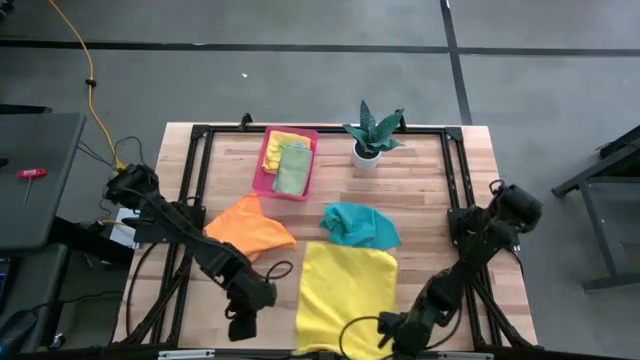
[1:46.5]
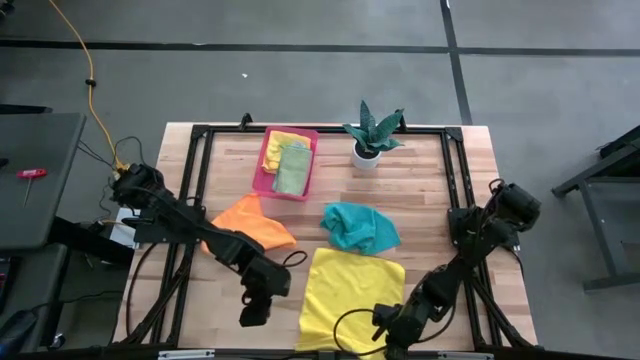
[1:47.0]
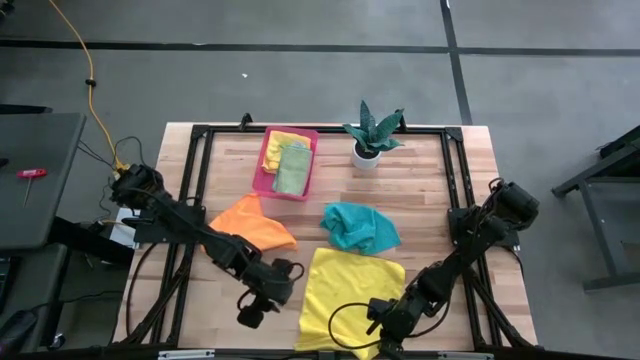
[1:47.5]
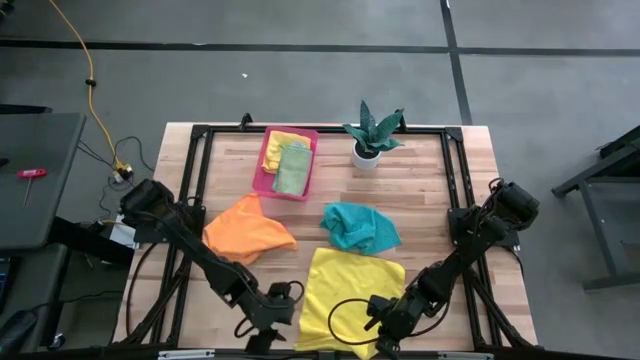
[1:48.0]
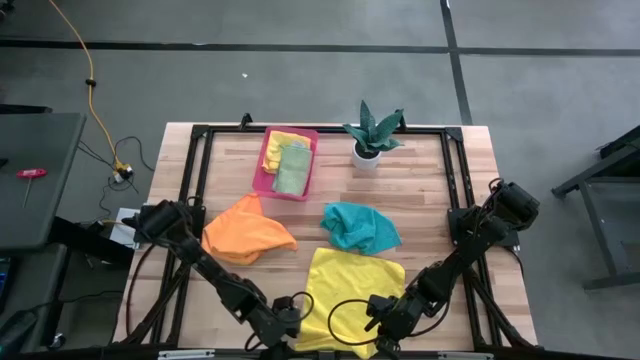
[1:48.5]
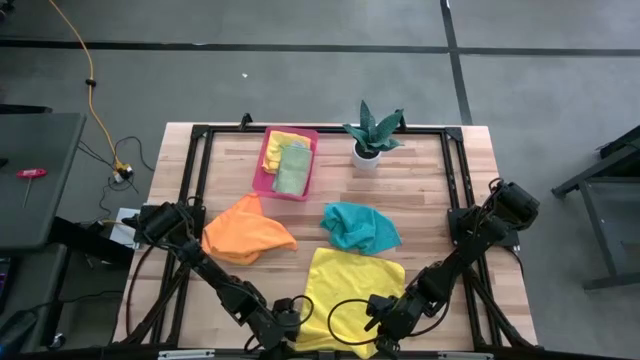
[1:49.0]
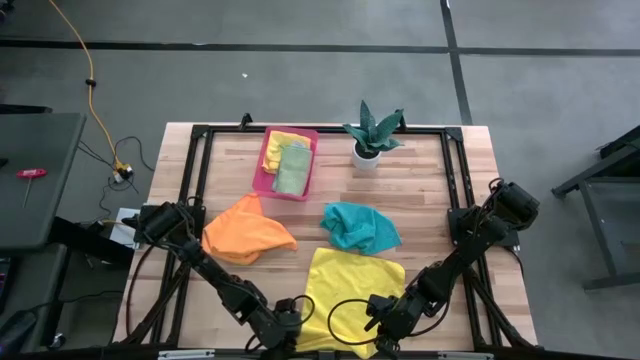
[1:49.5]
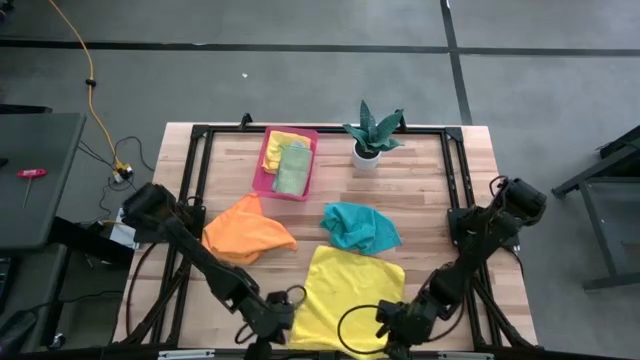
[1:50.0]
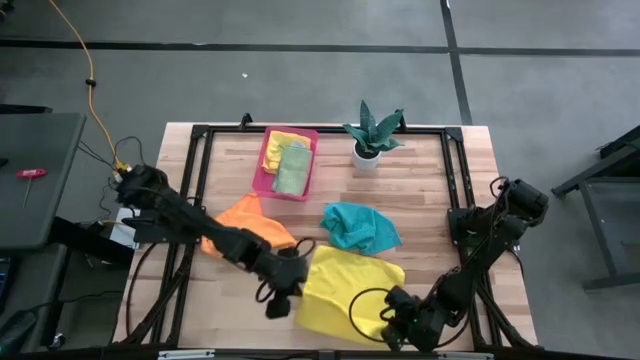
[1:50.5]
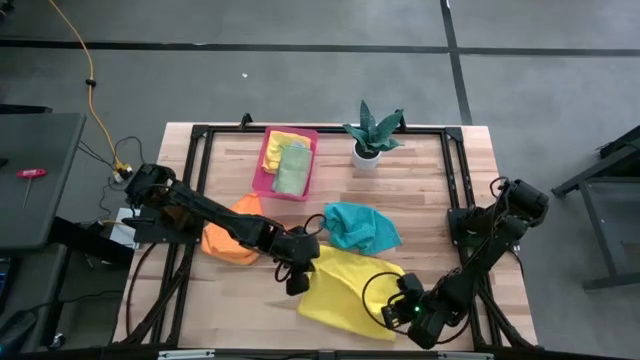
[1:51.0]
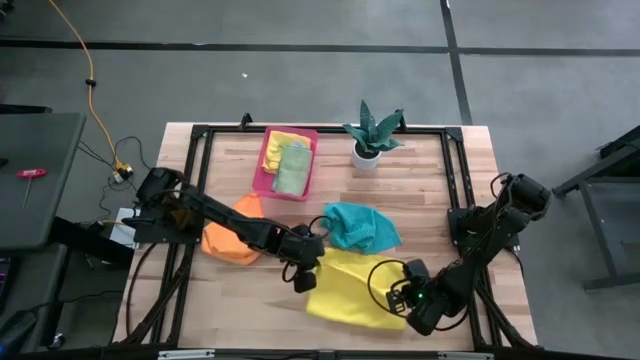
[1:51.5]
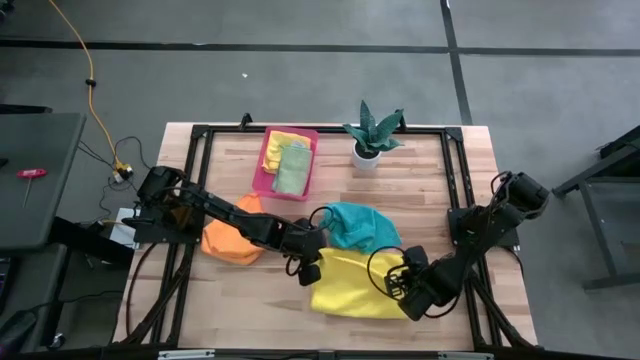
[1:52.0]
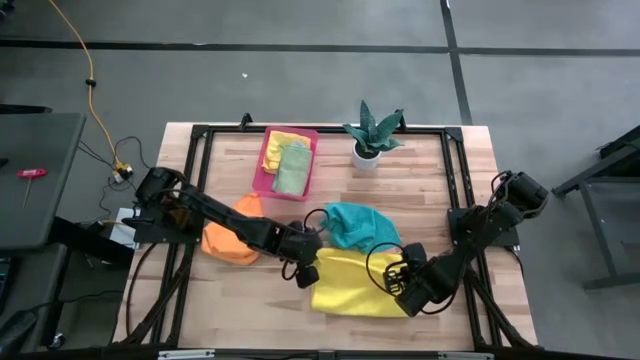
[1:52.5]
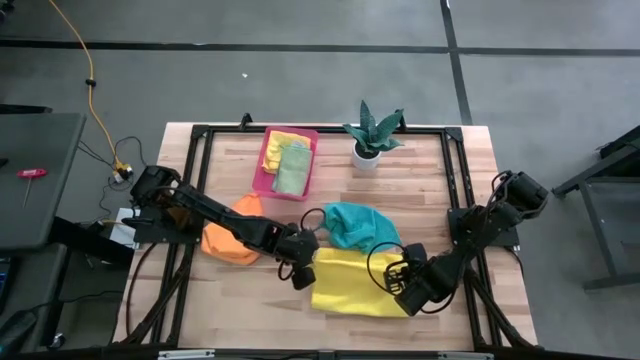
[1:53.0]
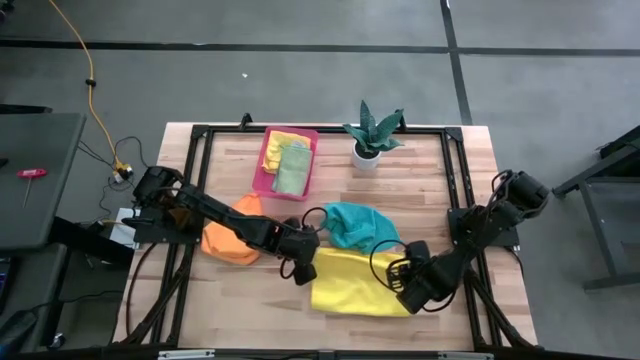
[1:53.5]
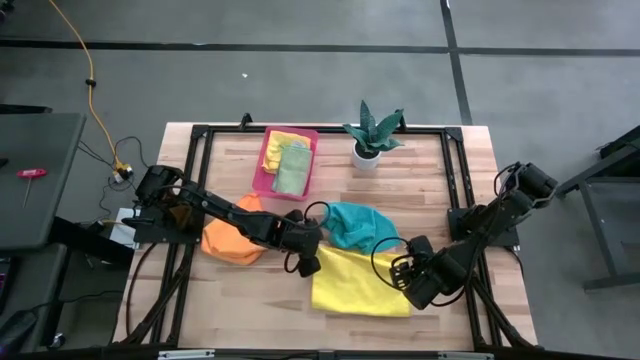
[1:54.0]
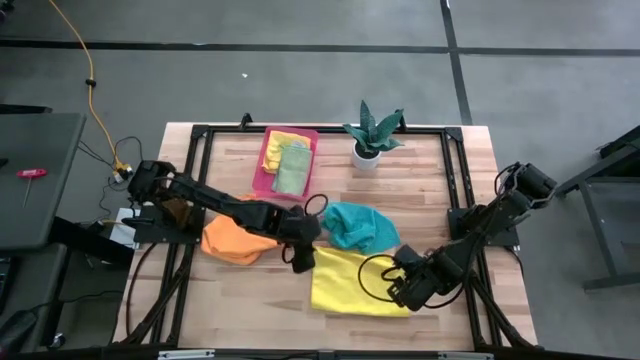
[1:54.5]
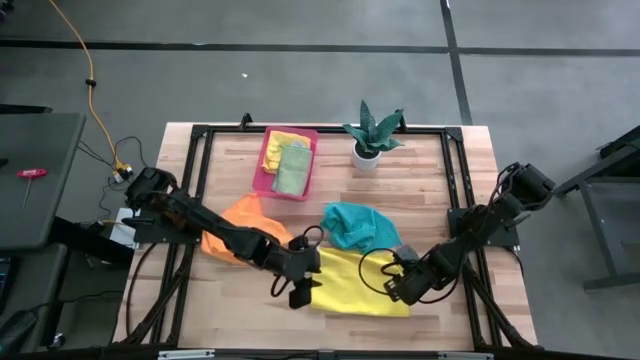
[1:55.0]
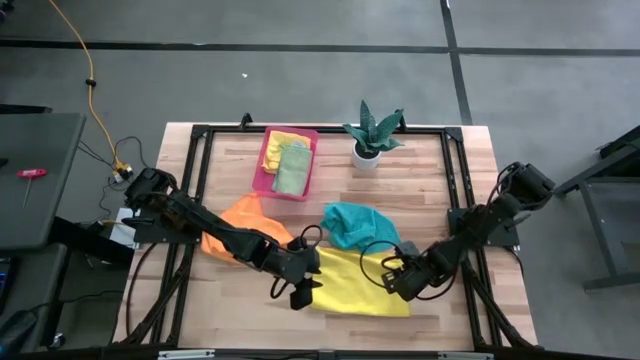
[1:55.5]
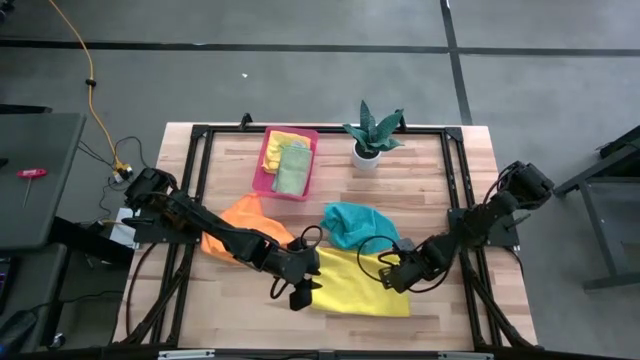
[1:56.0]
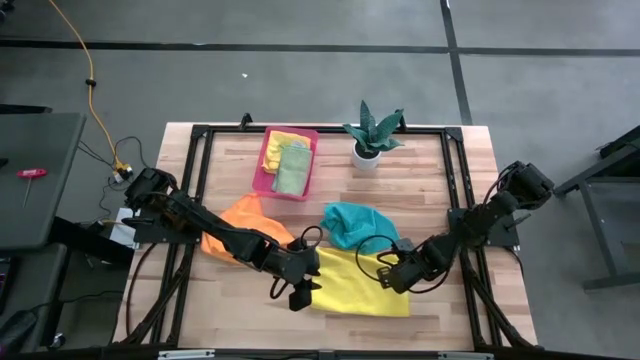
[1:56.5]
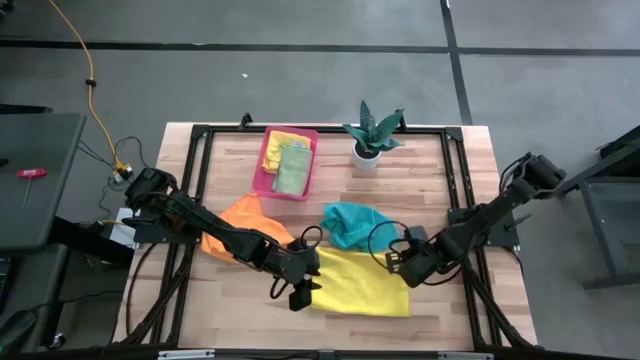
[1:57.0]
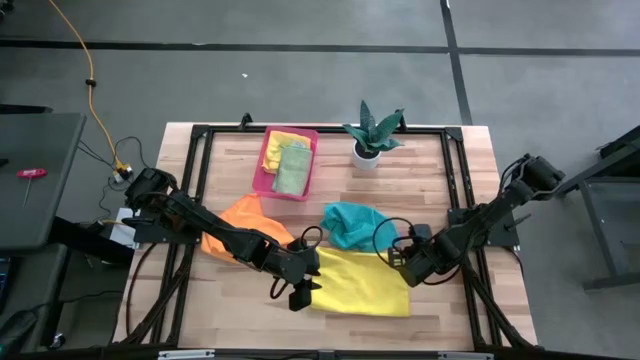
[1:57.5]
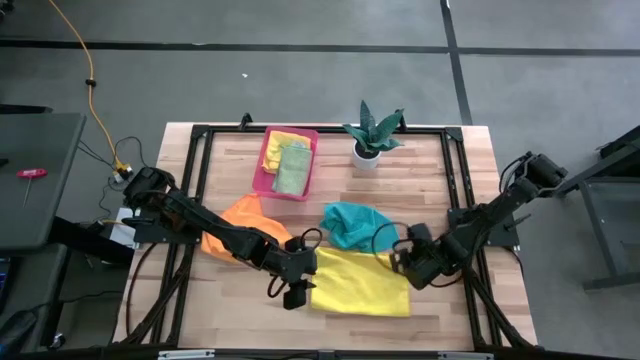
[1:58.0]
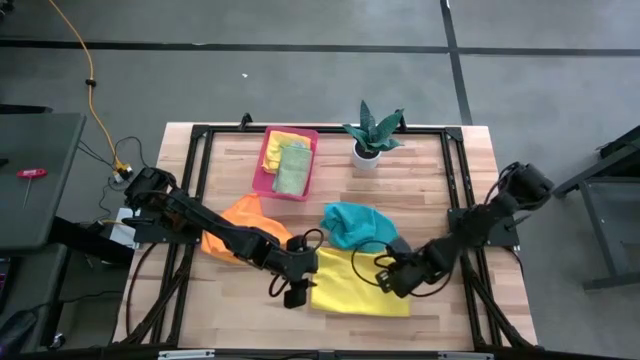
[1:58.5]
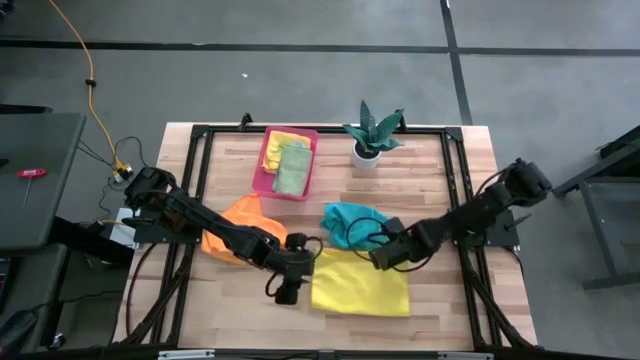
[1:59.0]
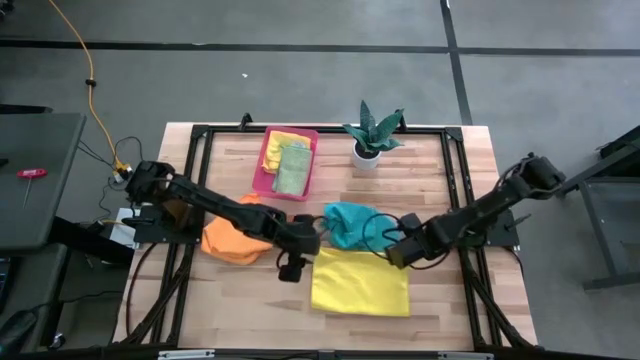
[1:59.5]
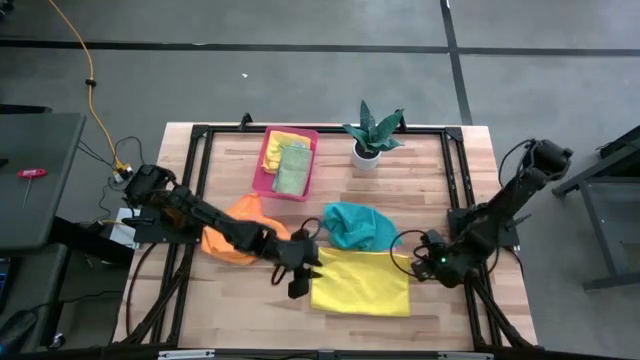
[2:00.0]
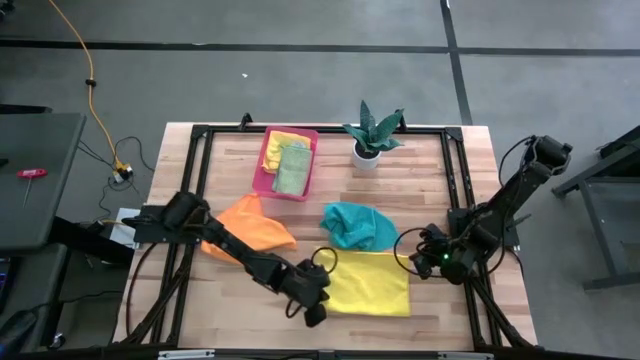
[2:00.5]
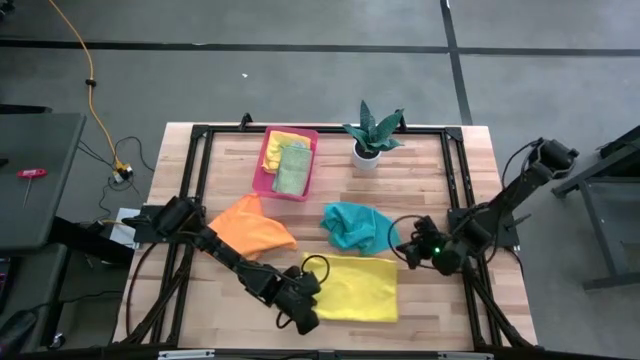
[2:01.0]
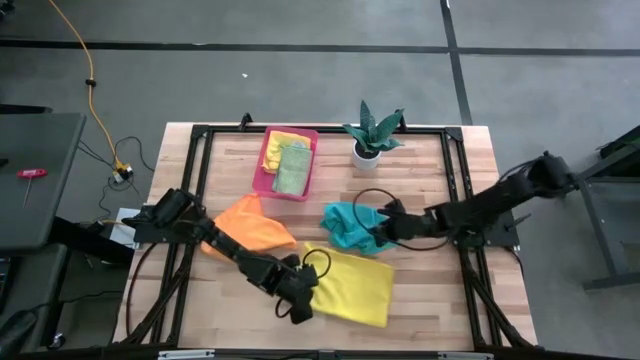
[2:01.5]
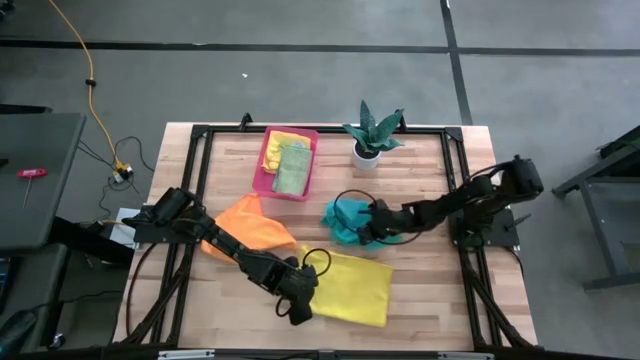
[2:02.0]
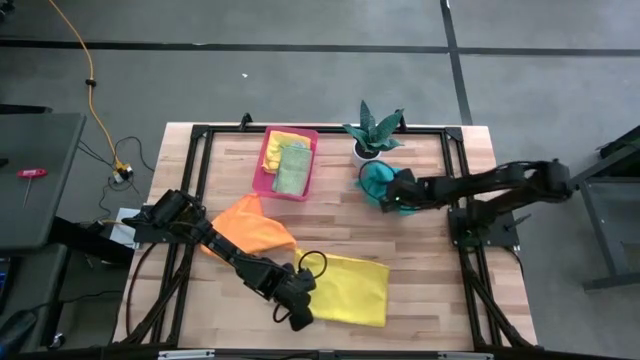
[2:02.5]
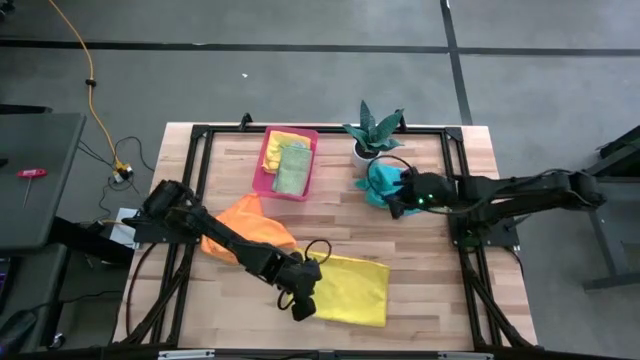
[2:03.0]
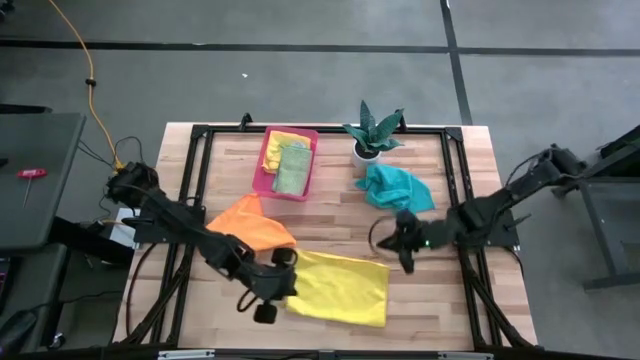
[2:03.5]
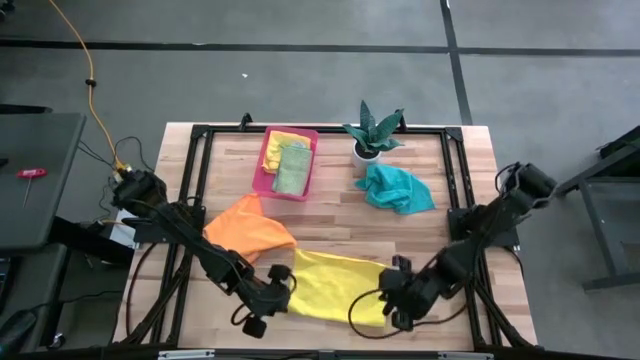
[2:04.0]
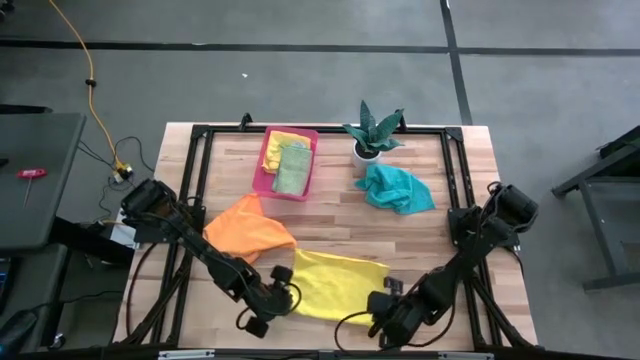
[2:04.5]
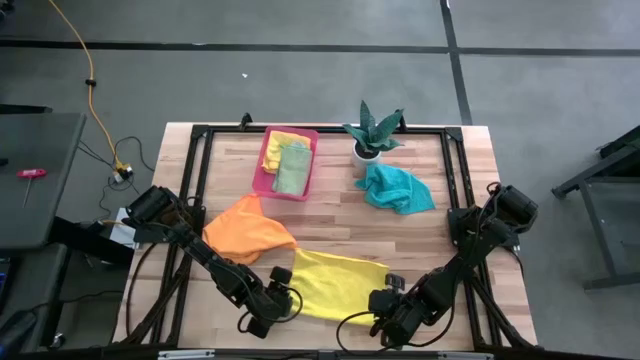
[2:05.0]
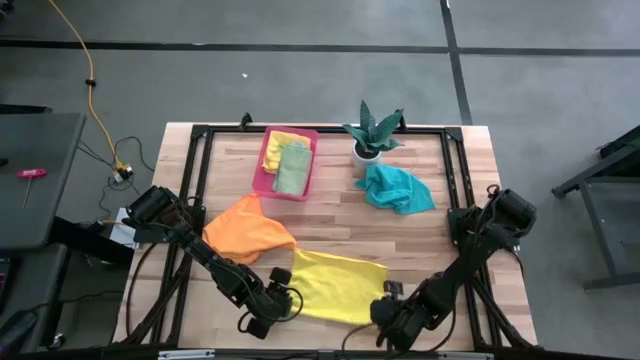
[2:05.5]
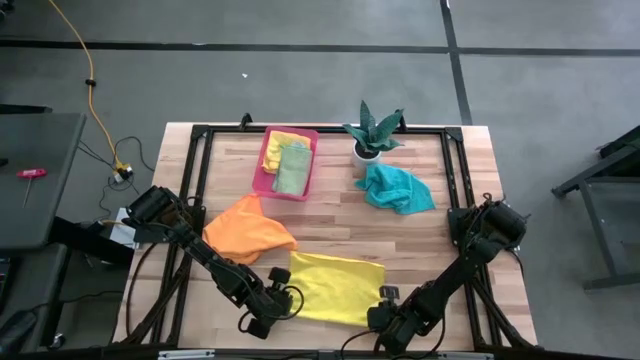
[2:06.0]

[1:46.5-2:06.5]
Task: Fold microfiber towels
Fold the yellow microfiber cloth

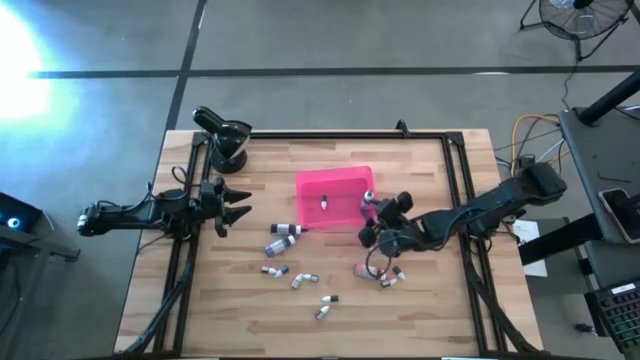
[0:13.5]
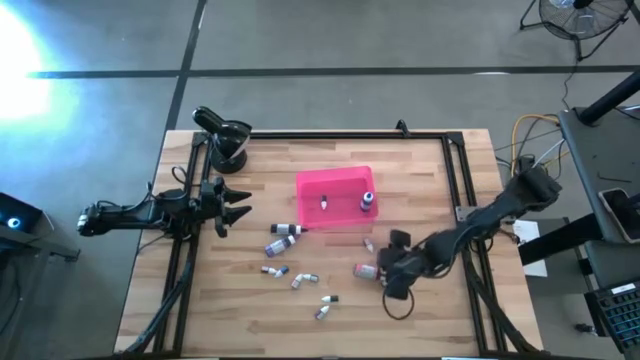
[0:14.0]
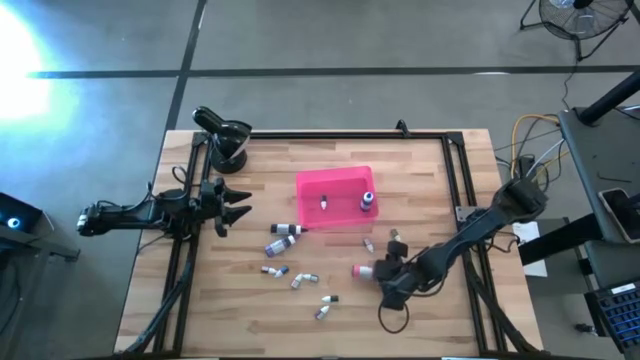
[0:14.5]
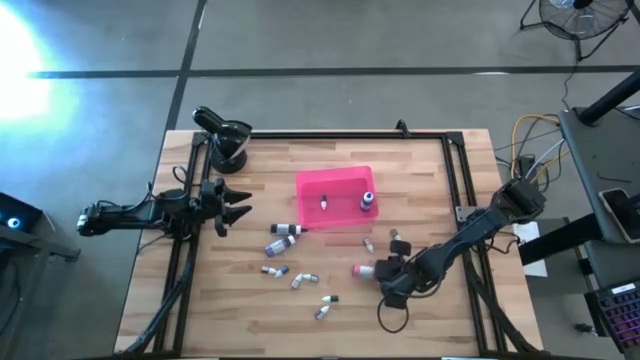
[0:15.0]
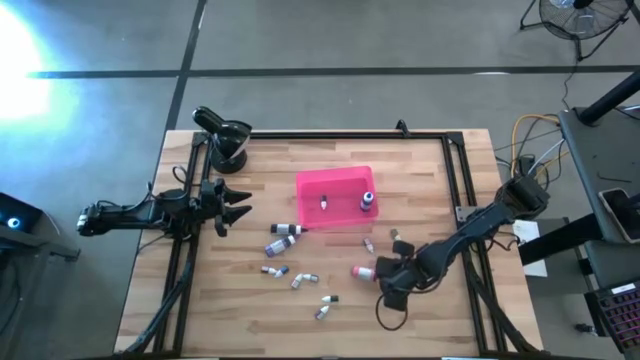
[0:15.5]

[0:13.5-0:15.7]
Task: Pick & Place food coloring
Put the large pink food coloring bottle into the pink bin
